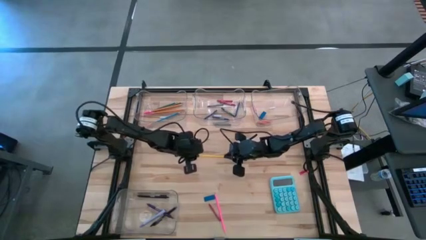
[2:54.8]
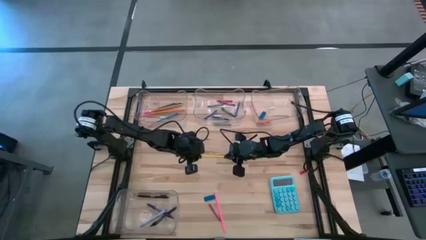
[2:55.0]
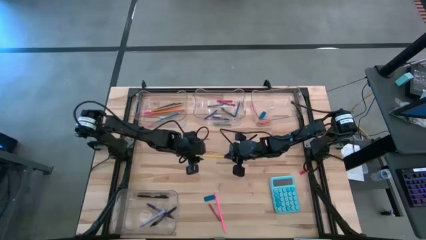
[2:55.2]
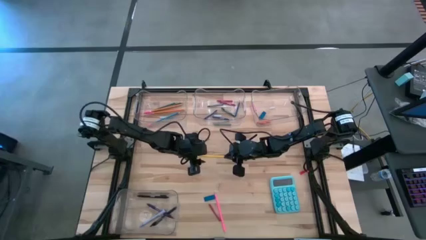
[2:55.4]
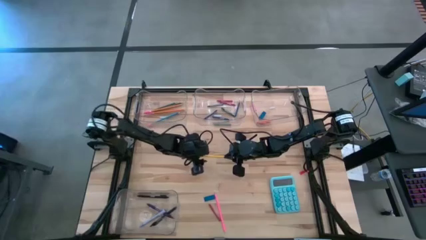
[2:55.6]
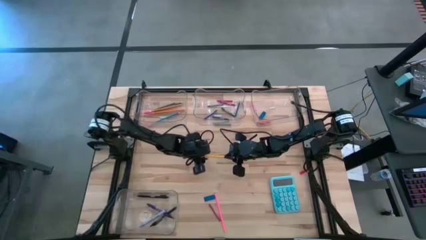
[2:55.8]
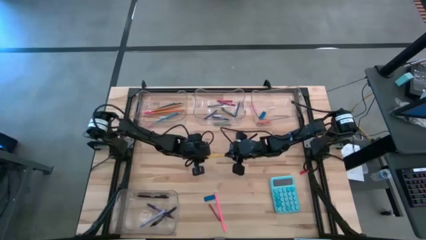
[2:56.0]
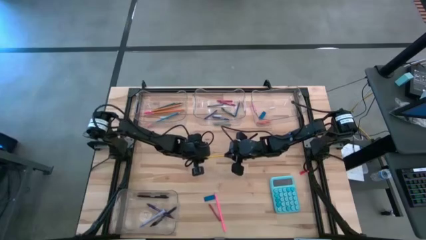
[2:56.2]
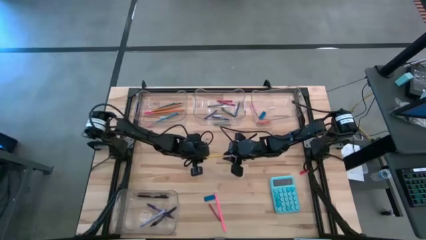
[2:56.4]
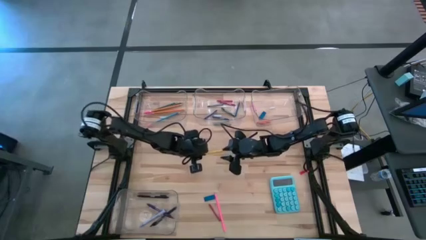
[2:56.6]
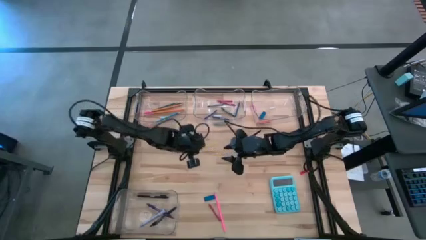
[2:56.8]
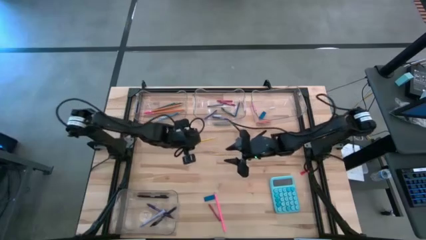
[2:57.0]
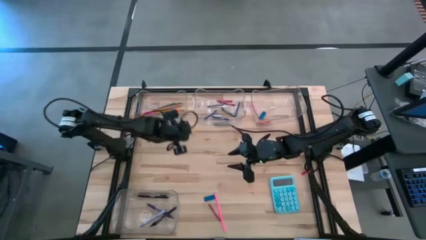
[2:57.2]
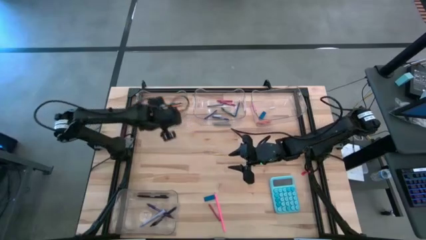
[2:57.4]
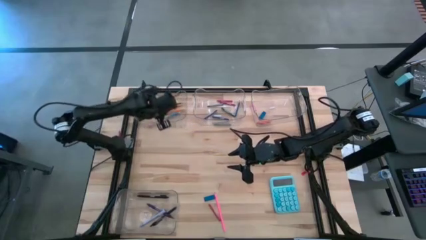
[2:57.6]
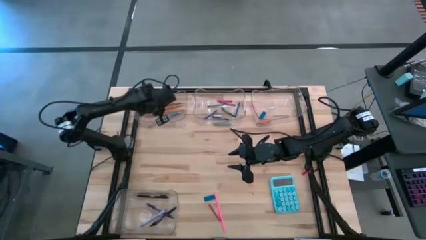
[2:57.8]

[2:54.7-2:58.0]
Task: Sort crayons/erasers/pens/pencils in bins
Put the yellow colored pencil into the top left transparent bin

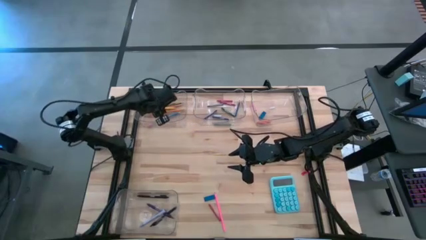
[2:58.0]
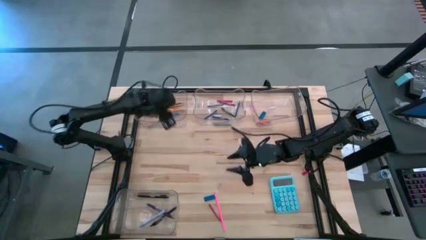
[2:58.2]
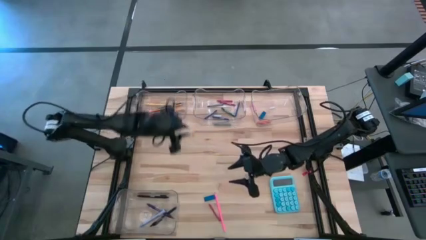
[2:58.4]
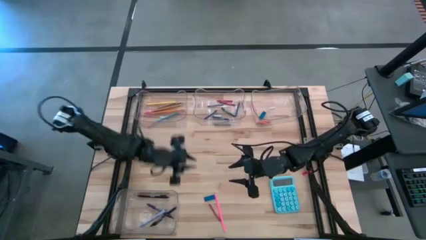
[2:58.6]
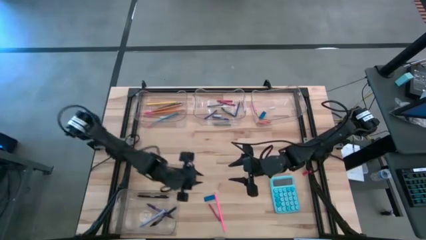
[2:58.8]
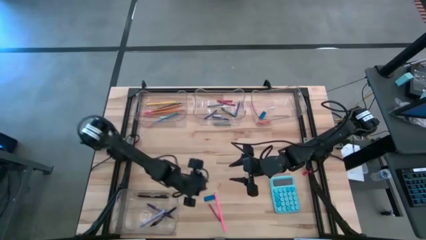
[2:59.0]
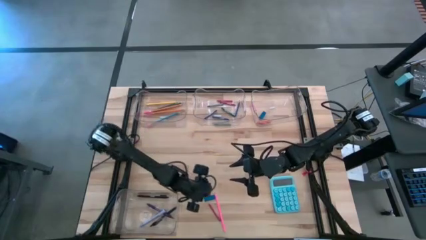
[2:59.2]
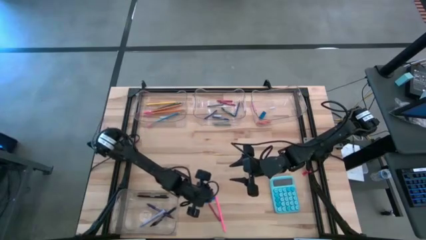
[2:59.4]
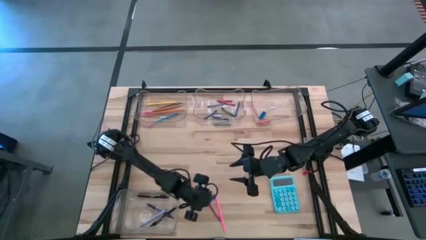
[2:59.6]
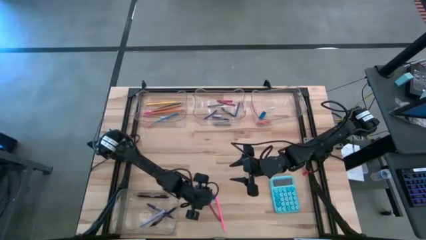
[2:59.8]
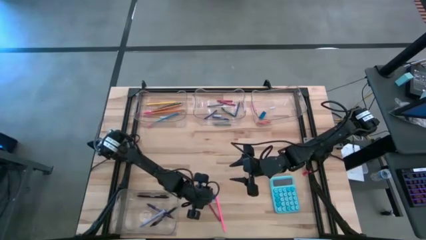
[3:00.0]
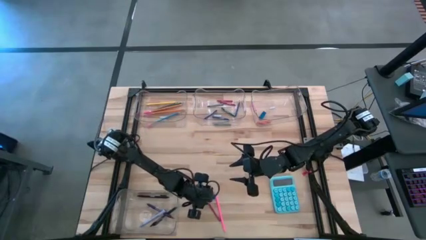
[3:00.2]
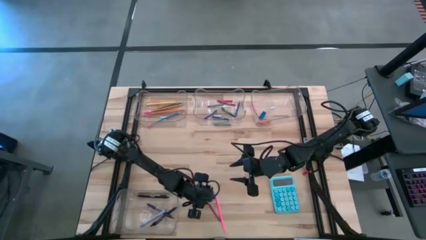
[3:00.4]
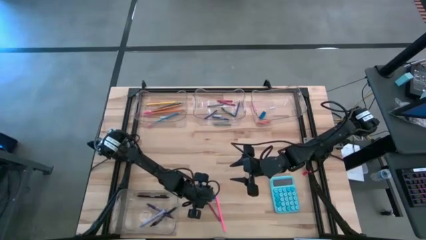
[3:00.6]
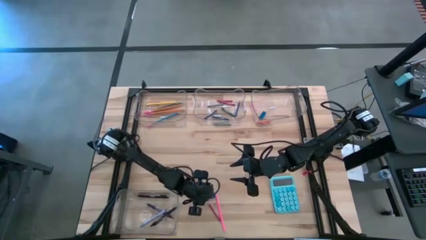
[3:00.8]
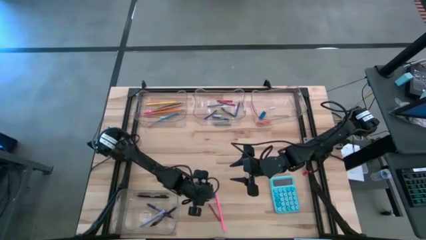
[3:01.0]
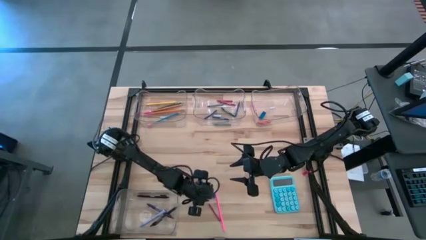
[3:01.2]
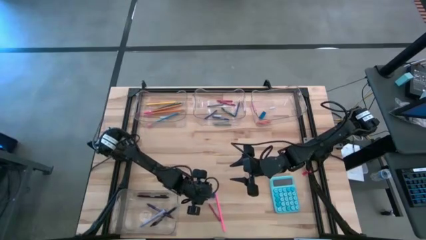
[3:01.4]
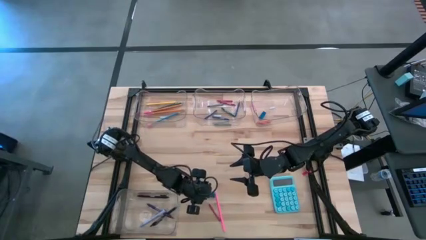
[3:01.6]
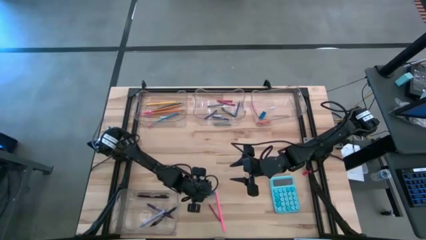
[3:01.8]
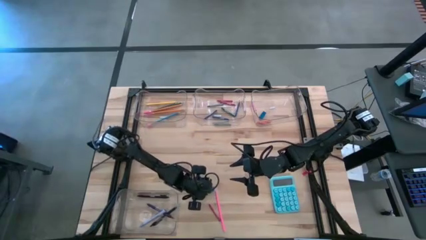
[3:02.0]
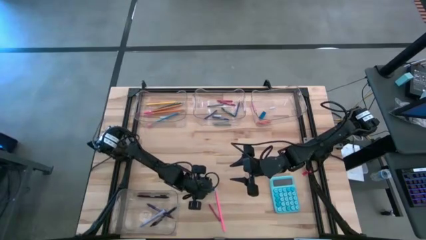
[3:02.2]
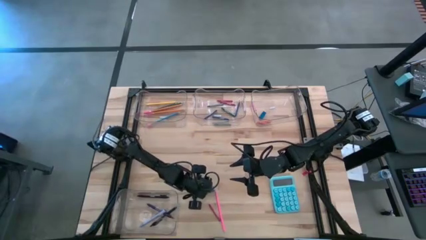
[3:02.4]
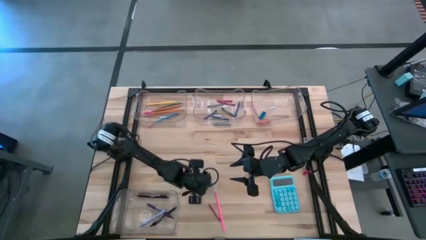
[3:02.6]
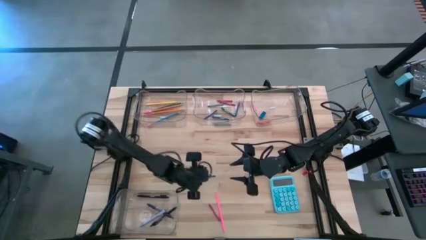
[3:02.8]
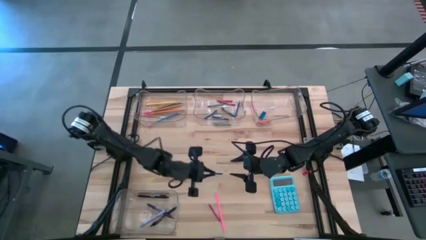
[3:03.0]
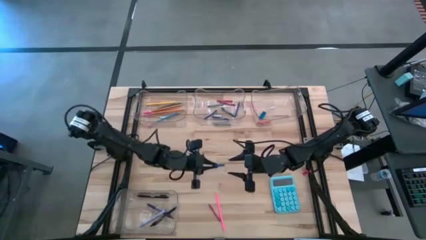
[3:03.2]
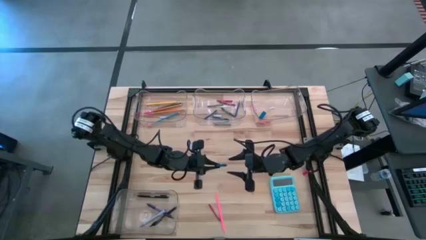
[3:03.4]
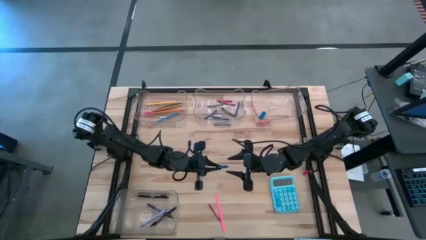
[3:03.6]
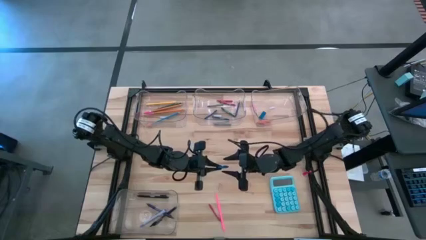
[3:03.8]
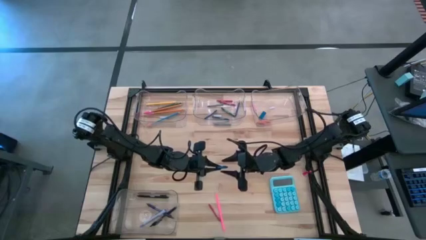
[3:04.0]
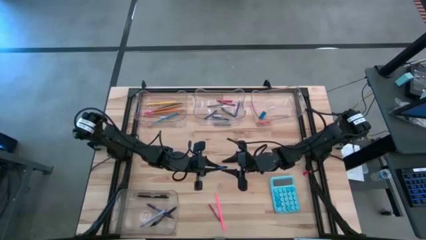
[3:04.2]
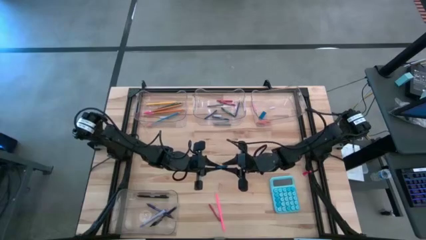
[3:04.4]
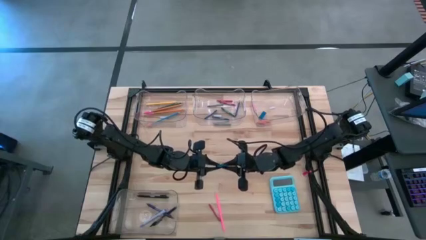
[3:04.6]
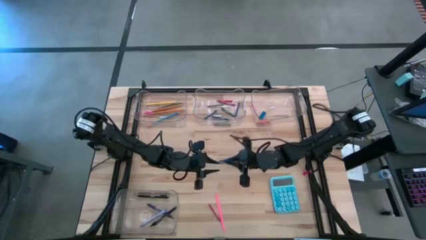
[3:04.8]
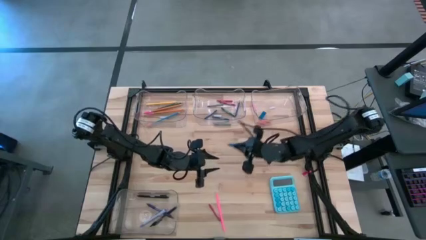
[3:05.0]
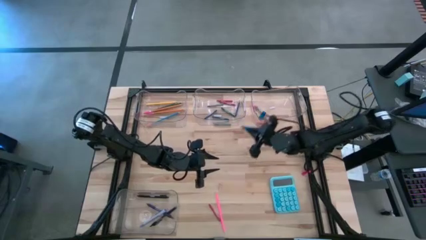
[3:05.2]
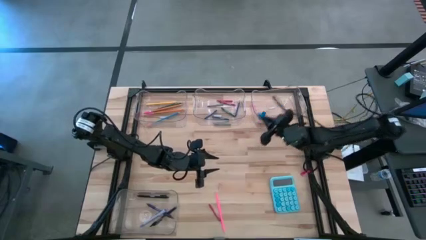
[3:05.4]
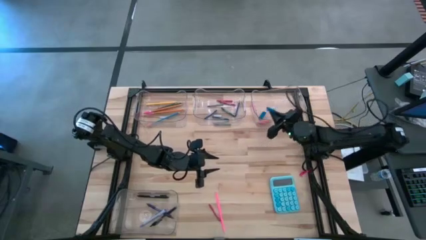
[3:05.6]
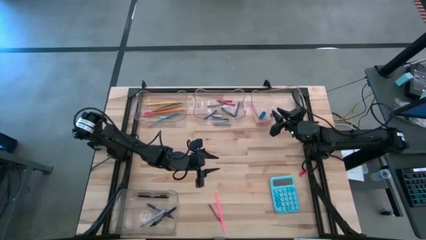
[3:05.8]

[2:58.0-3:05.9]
Put the blue eraser into the top right transparent bin

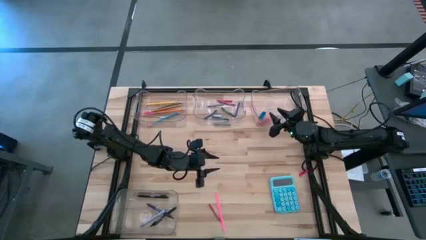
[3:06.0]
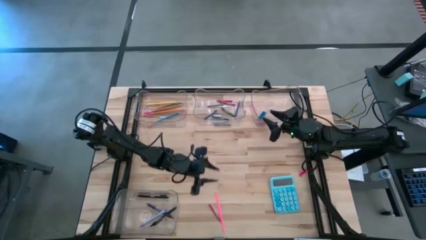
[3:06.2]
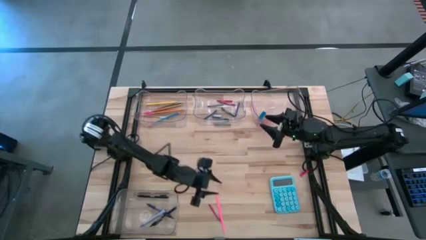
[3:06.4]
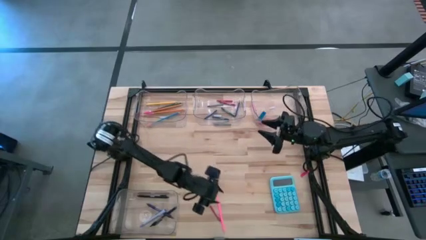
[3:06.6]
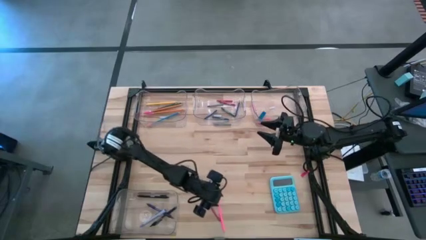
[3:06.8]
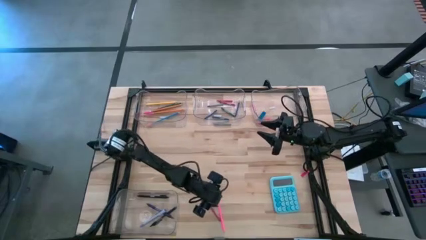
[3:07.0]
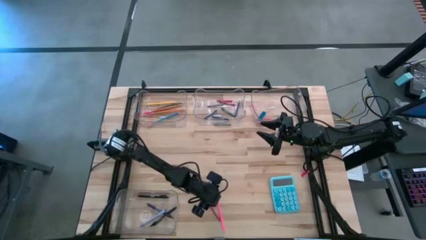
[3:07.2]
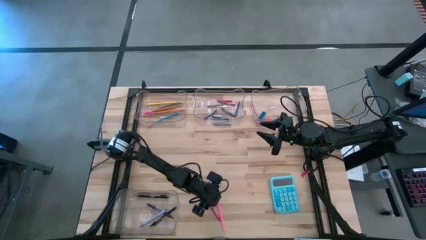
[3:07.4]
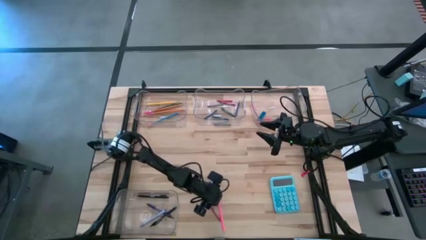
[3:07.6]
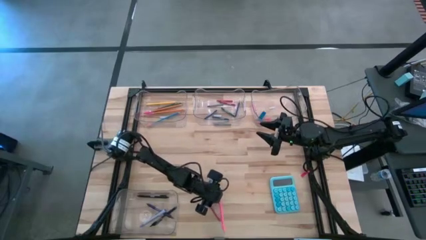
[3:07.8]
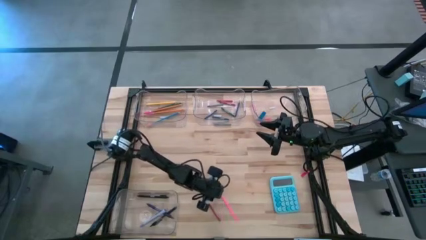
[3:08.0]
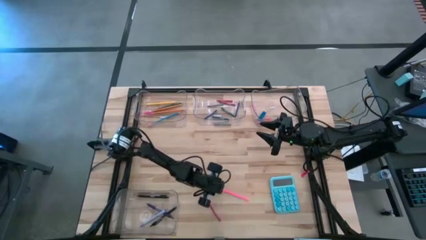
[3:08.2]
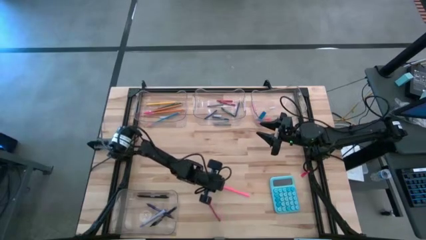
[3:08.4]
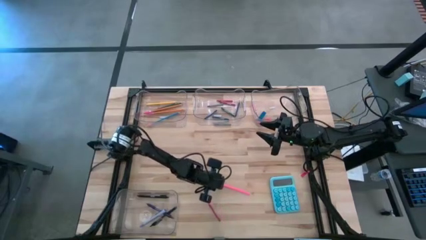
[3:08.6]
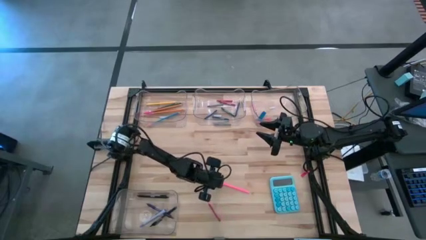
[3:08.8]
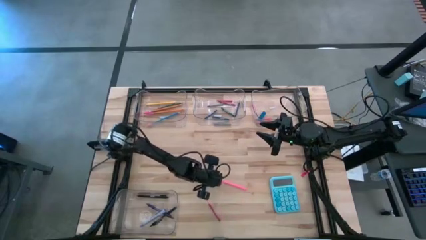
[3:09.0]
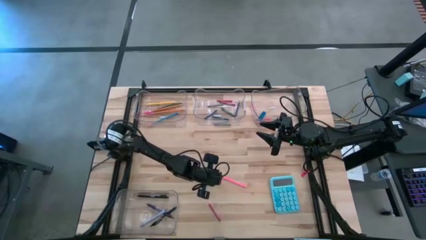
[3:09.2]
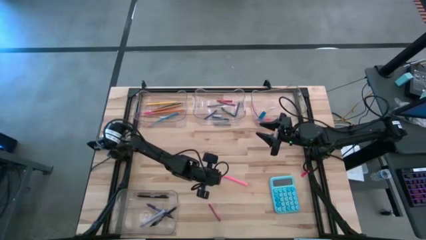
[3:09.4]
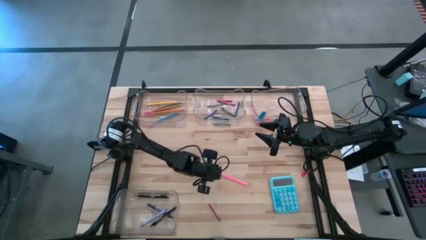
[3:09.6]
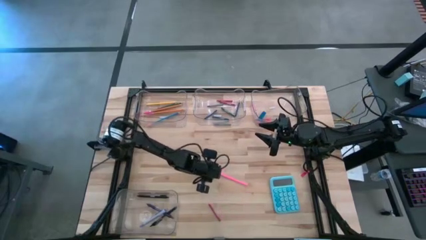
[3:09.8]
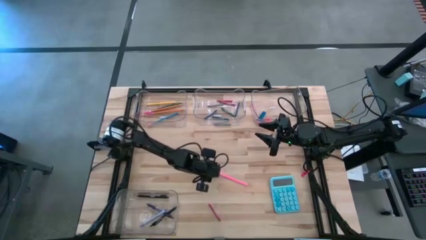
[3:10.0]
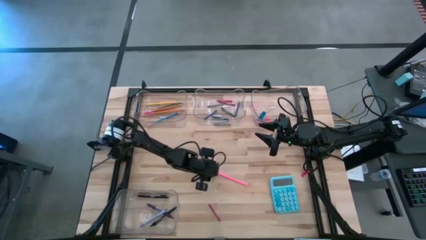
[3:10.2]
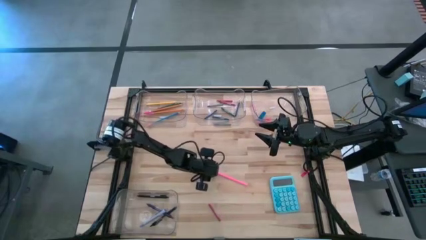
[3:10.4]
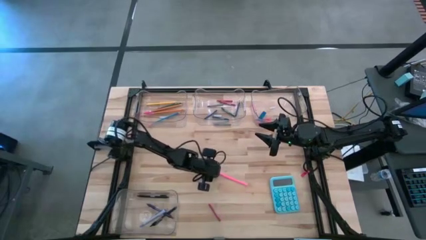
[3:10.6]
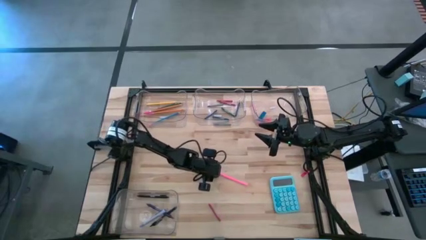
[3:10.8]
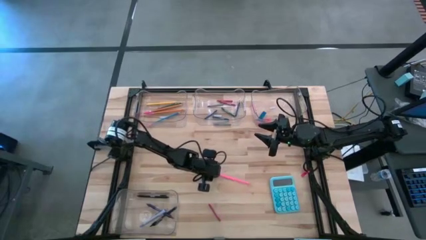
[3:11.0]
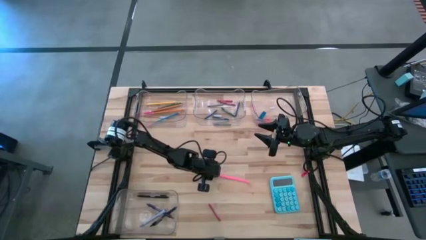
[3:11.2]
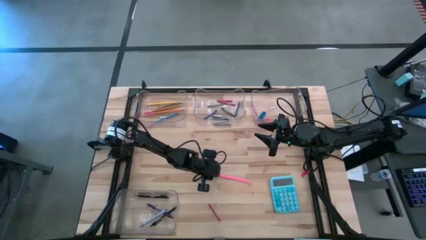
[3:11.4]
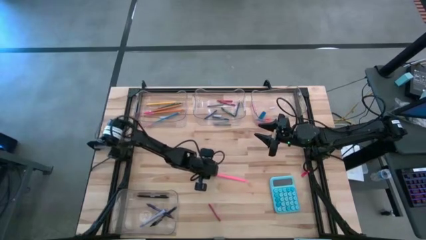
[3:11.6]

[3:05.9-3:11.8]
Put the pink colored pencil into the top left transparent bin
